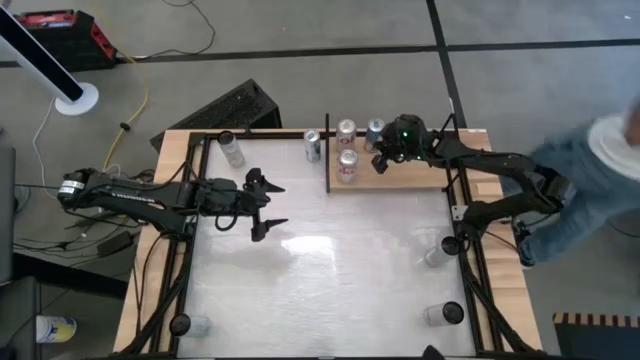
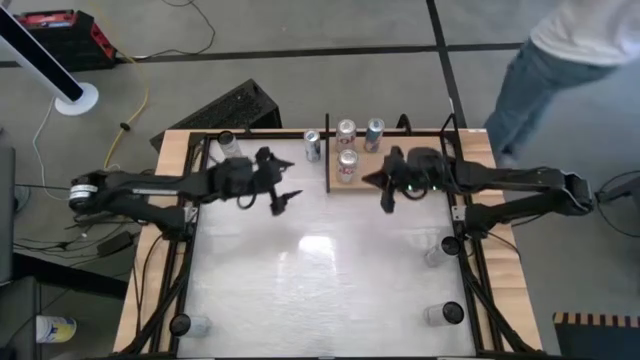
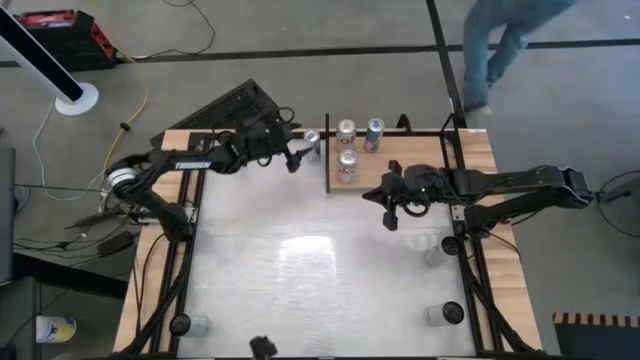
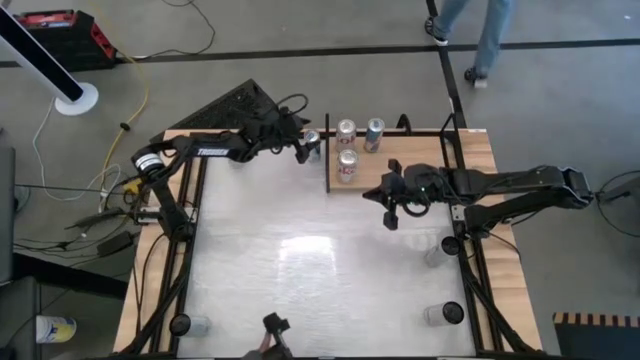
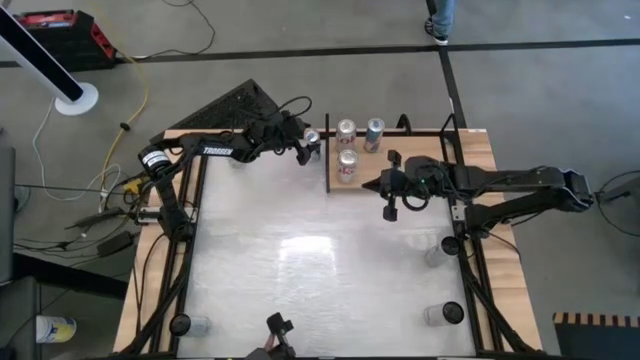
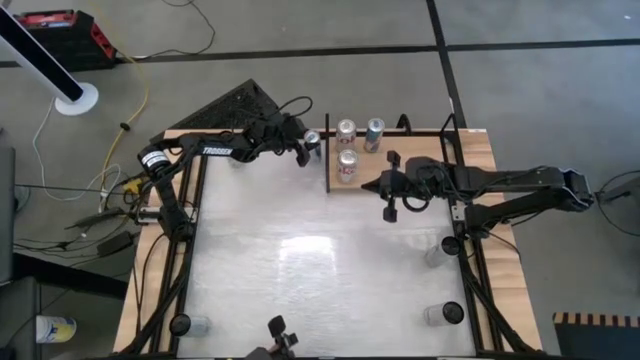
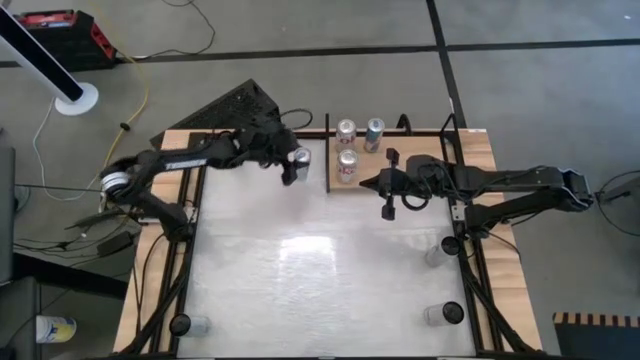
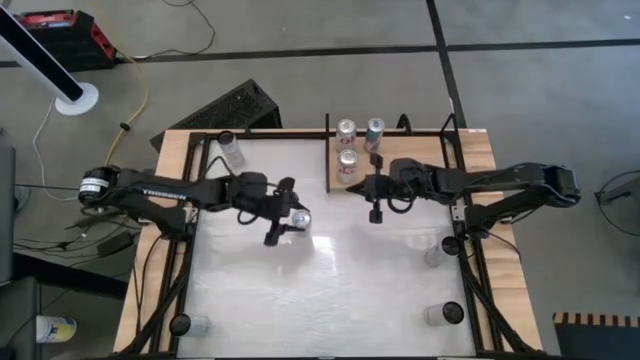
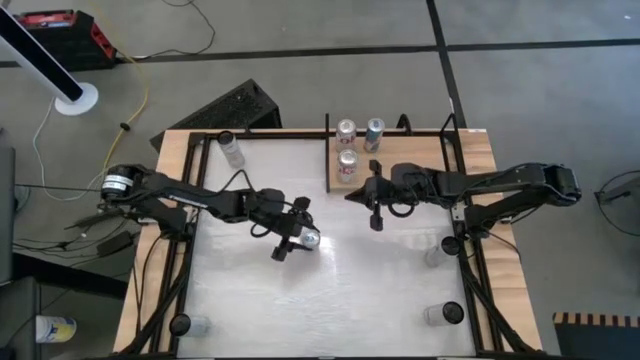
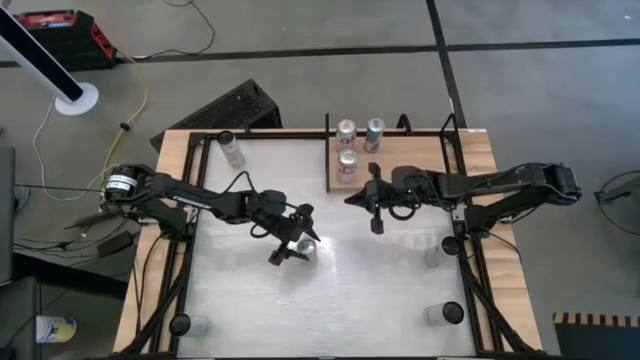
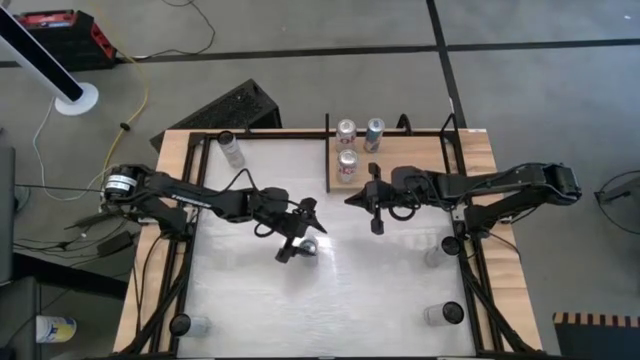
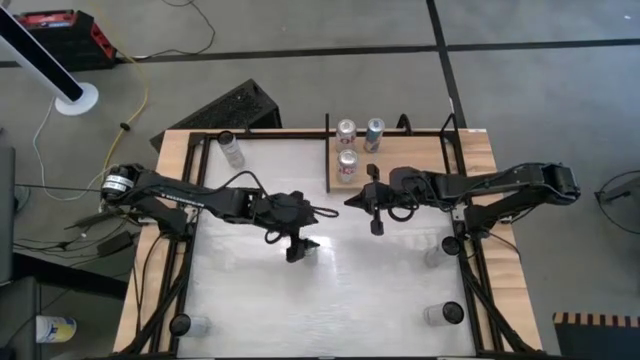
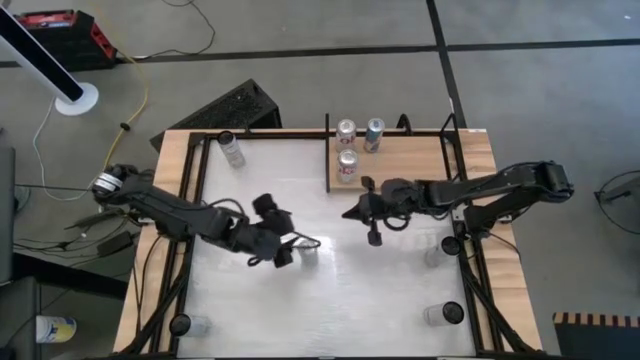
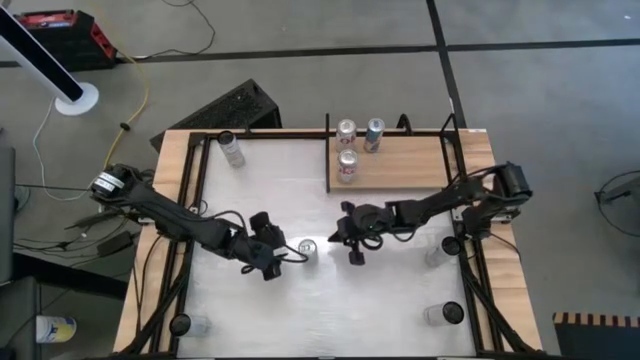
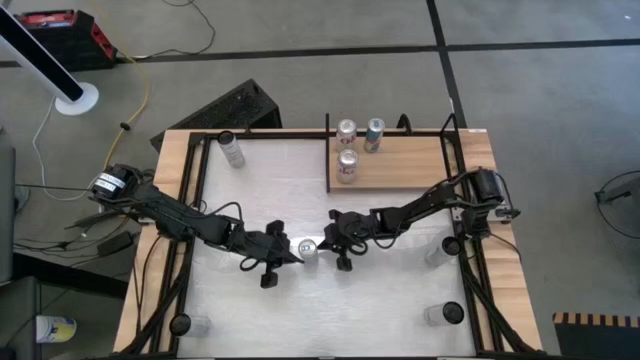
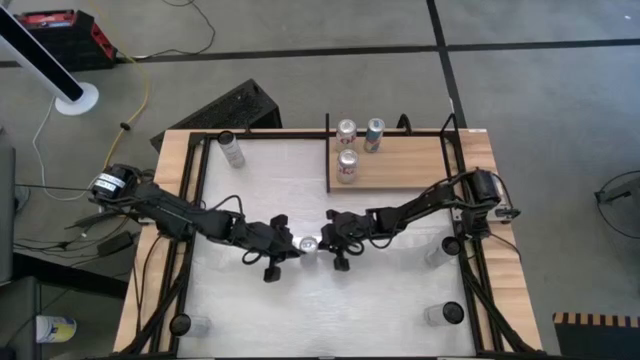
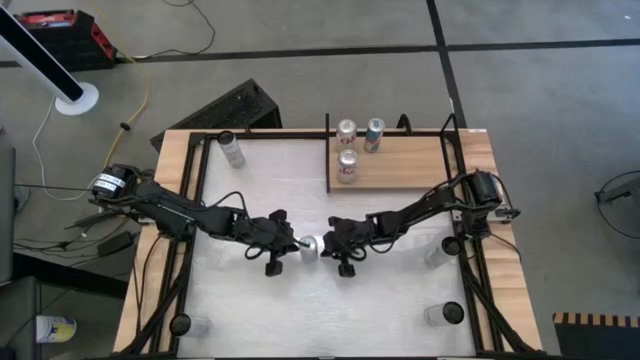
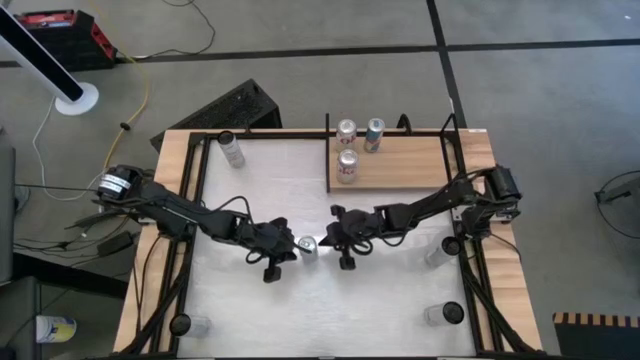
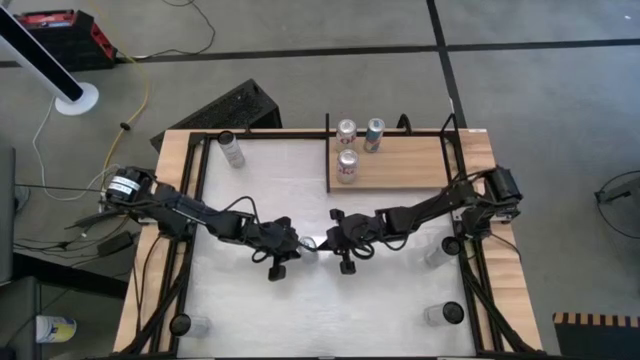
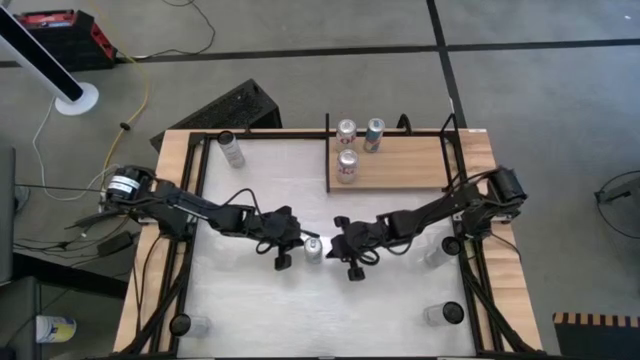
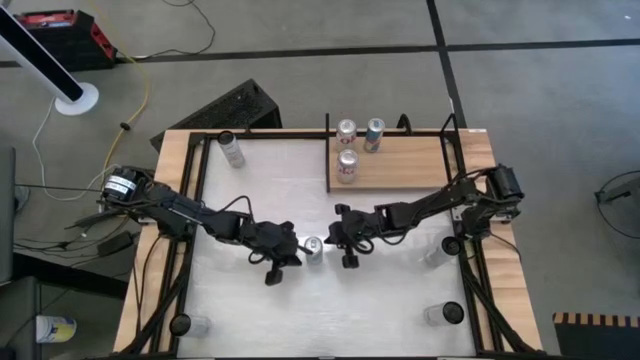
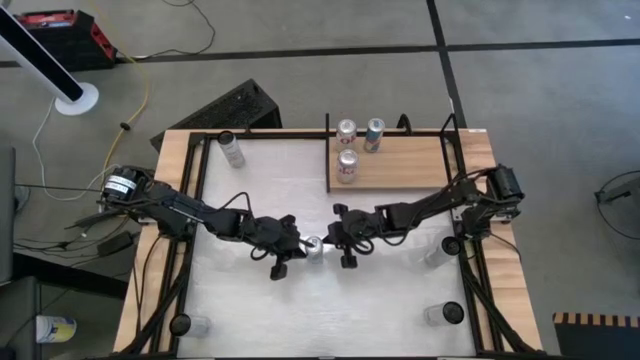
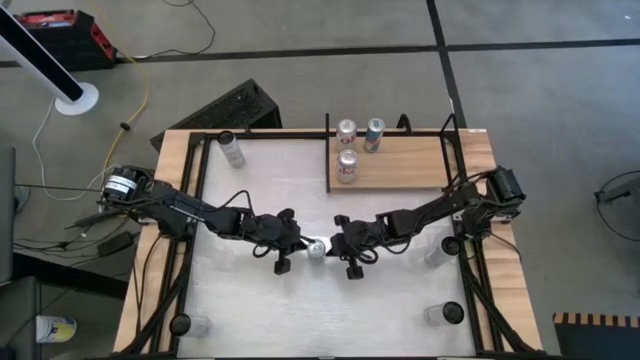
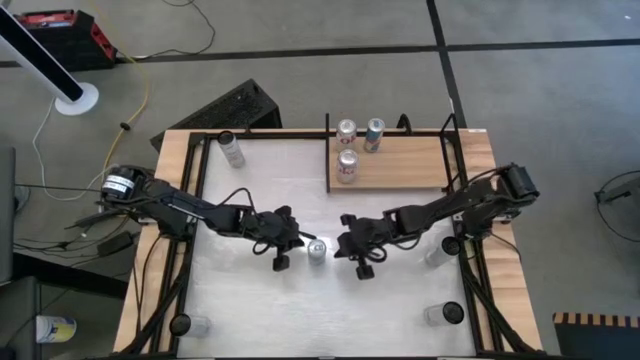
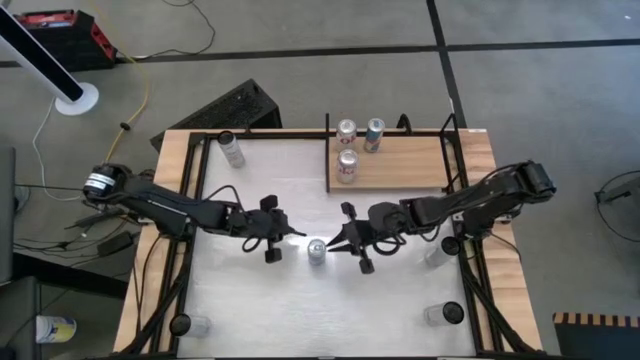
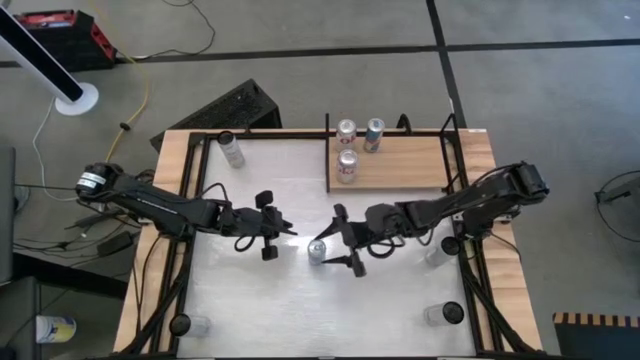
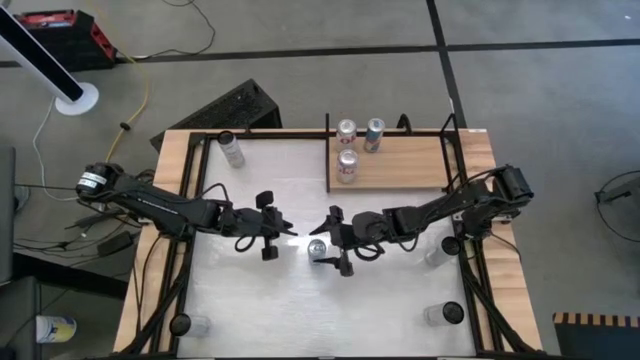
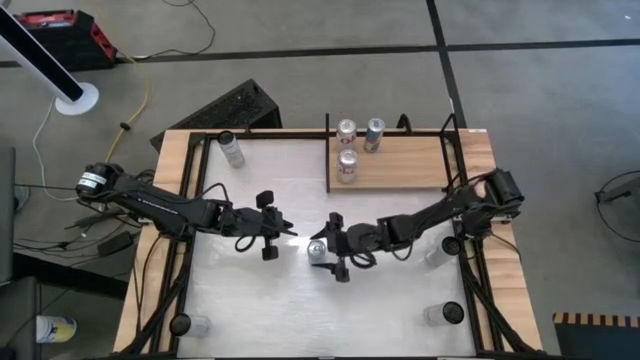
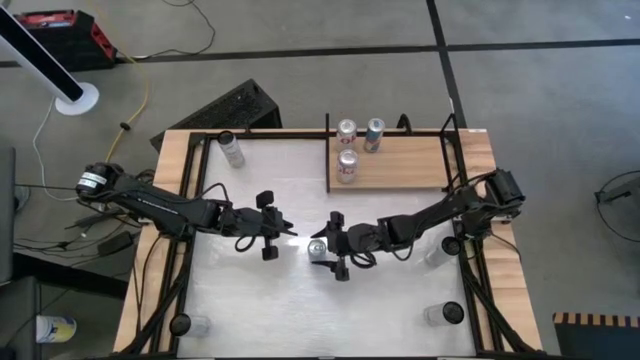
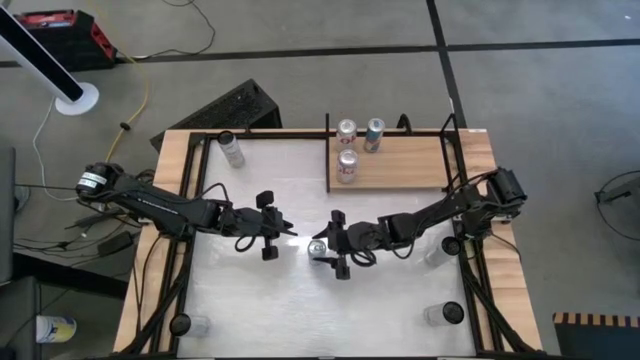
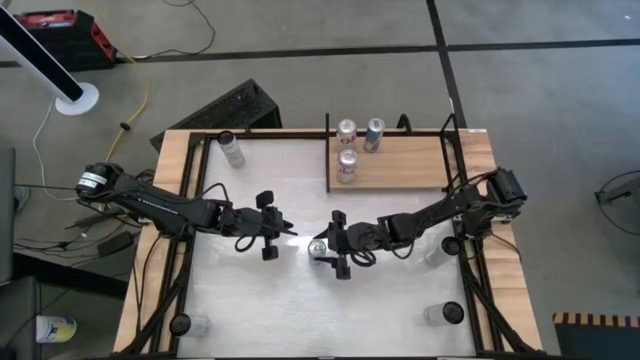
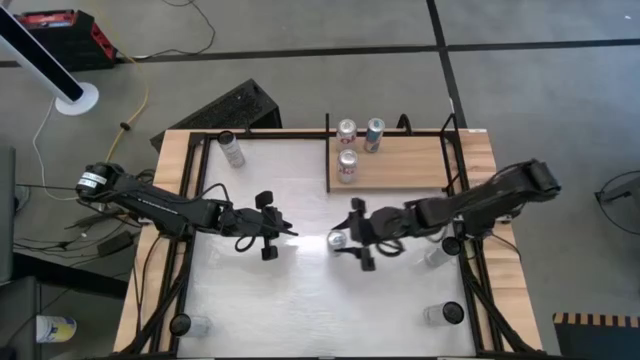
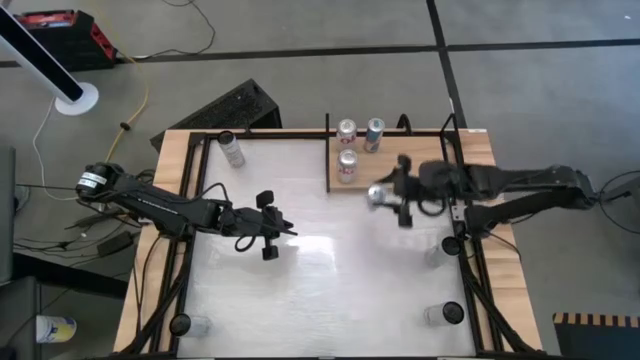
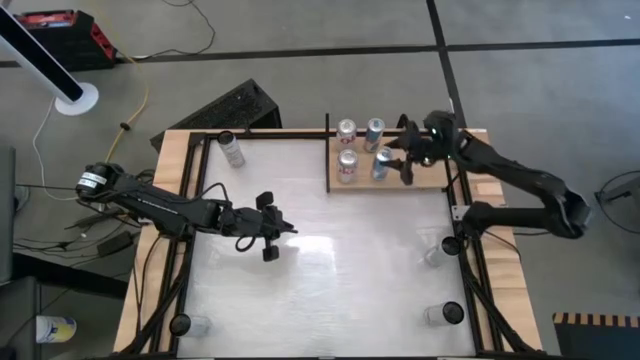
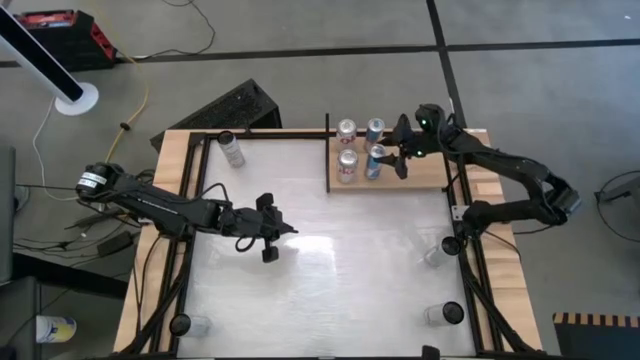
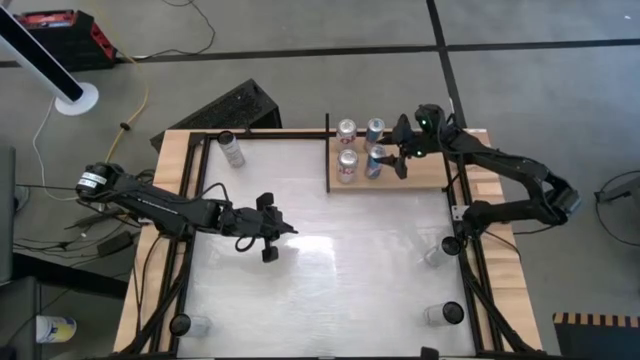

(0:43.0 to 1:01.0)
Task: Place canned beverage on shelf
Put the blue soda can aligned with the other blue soda can on the shelf
